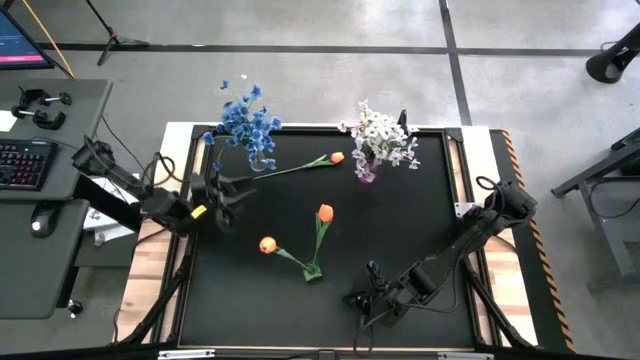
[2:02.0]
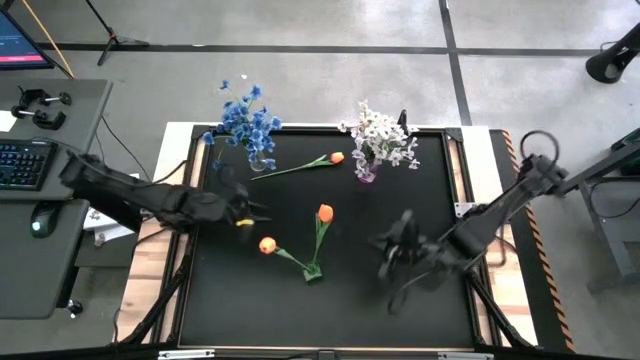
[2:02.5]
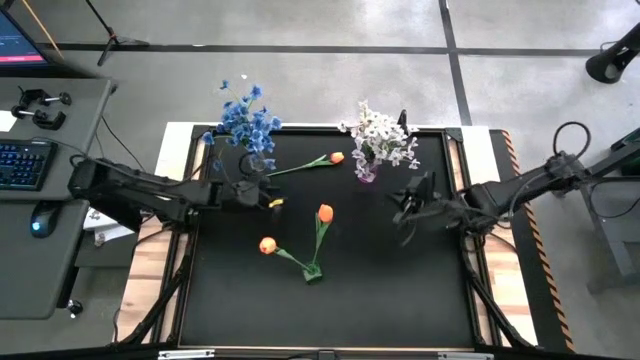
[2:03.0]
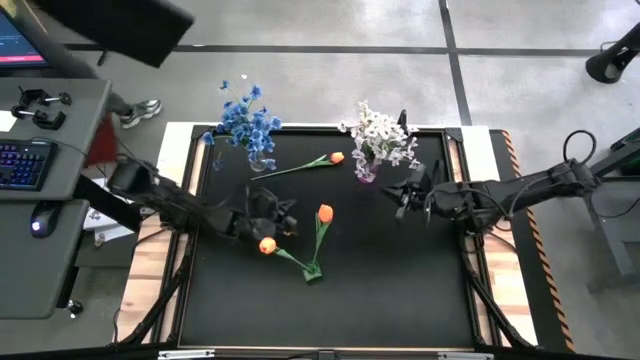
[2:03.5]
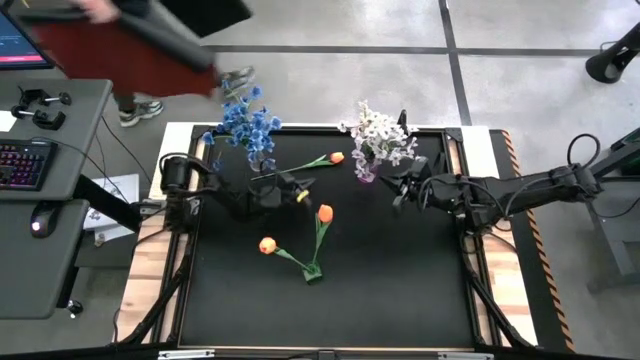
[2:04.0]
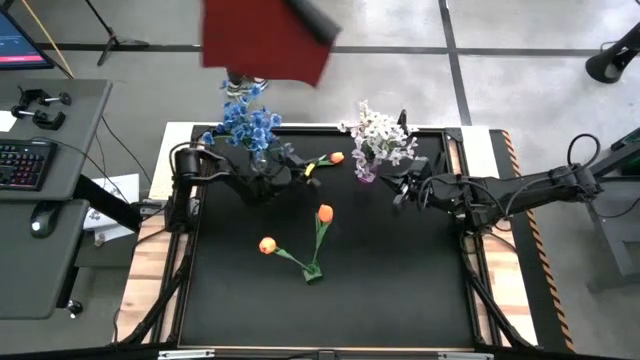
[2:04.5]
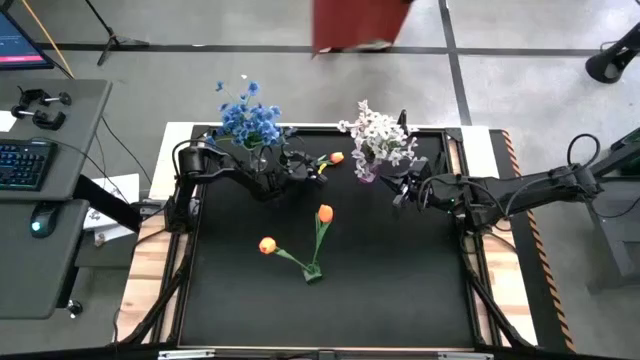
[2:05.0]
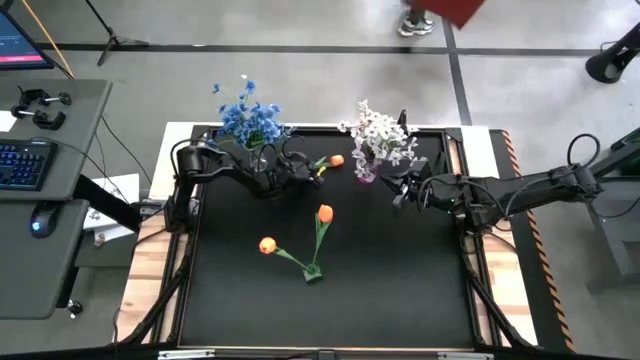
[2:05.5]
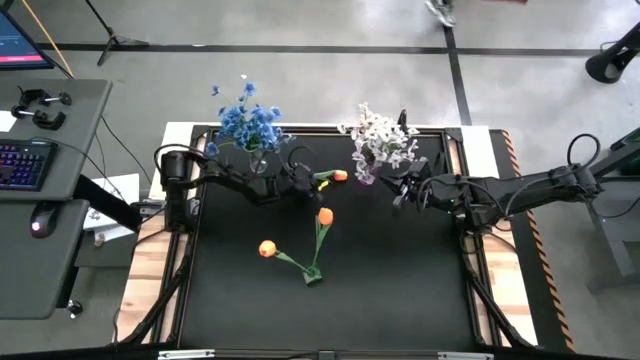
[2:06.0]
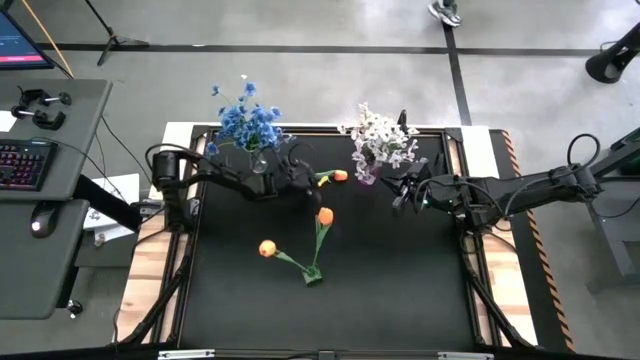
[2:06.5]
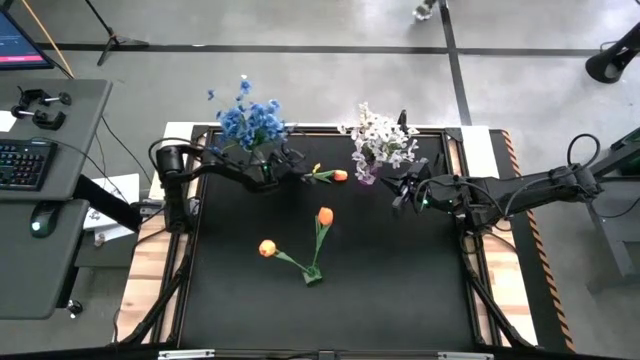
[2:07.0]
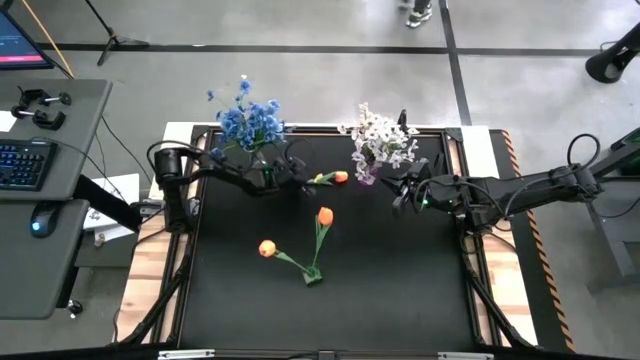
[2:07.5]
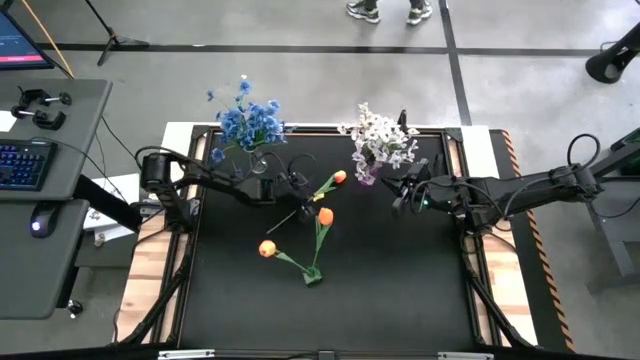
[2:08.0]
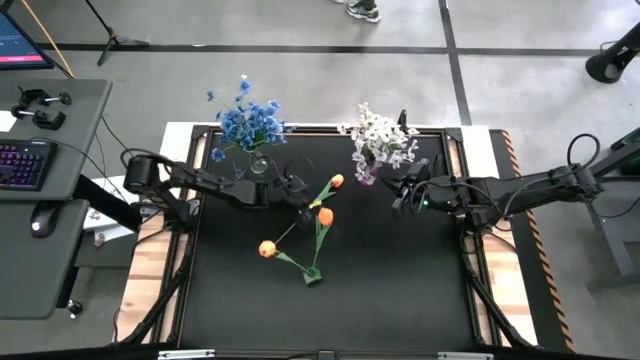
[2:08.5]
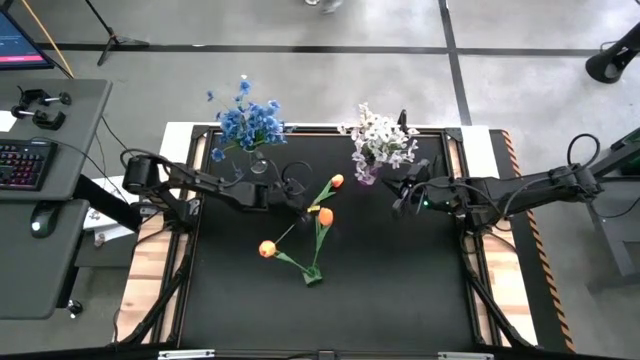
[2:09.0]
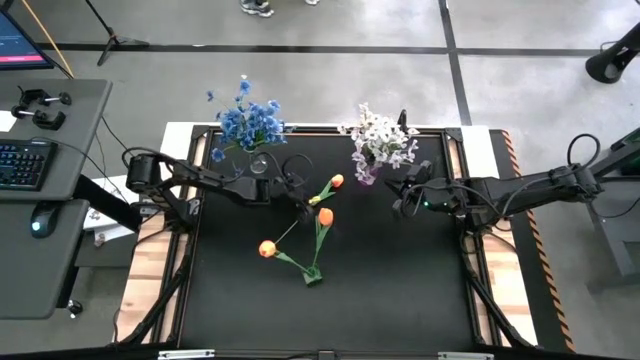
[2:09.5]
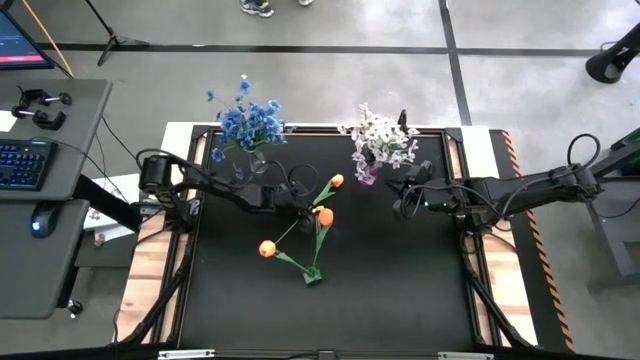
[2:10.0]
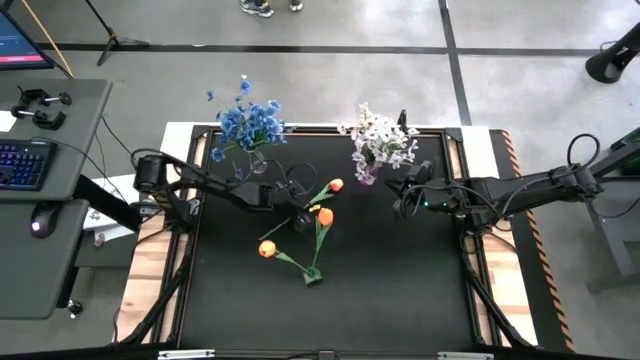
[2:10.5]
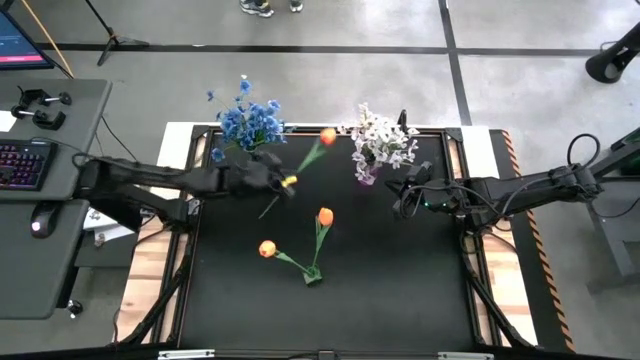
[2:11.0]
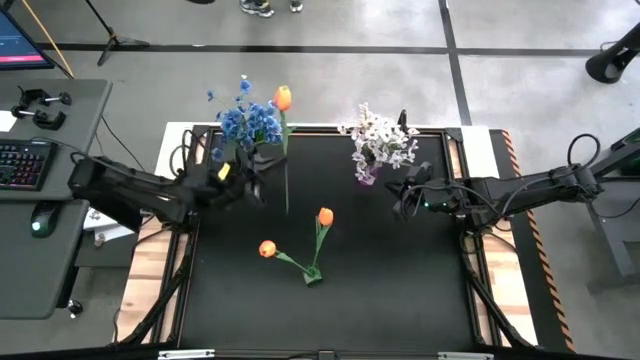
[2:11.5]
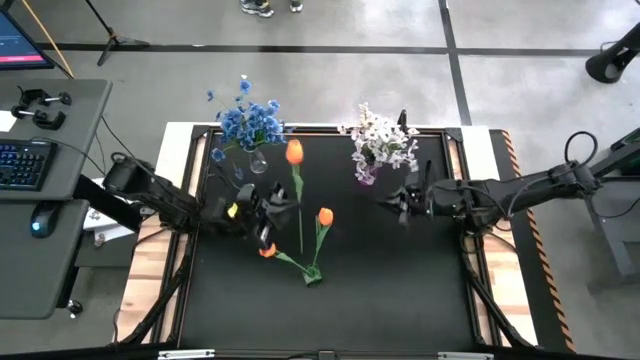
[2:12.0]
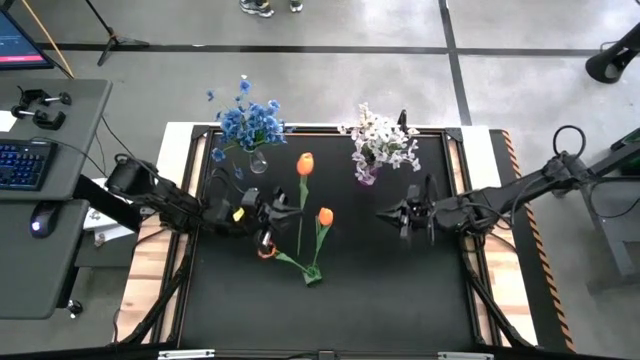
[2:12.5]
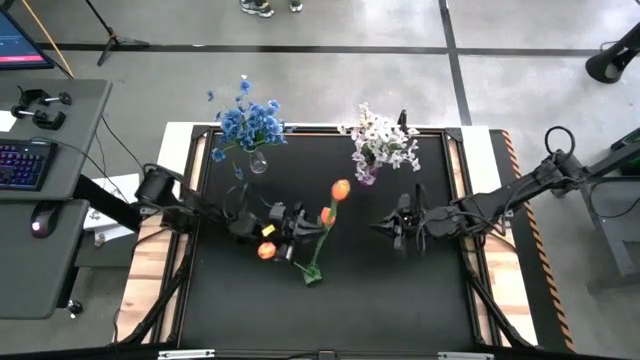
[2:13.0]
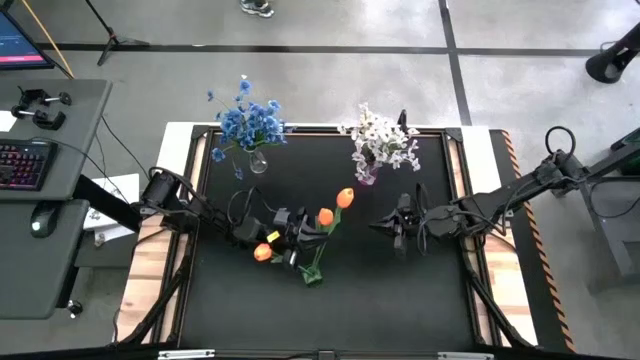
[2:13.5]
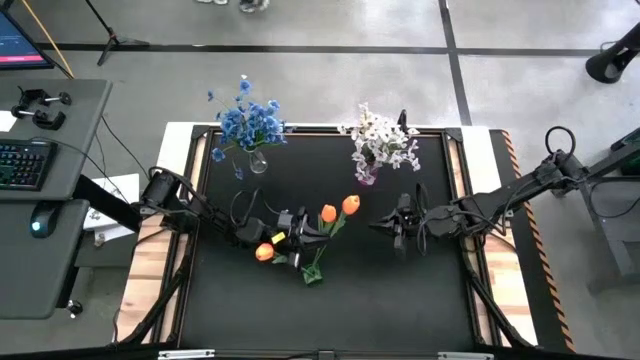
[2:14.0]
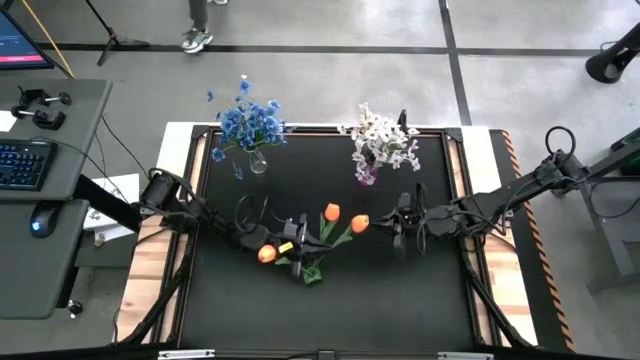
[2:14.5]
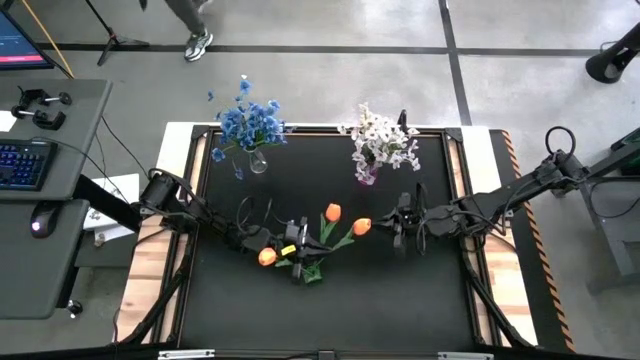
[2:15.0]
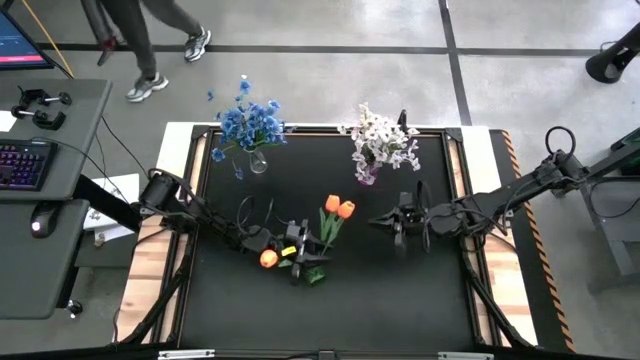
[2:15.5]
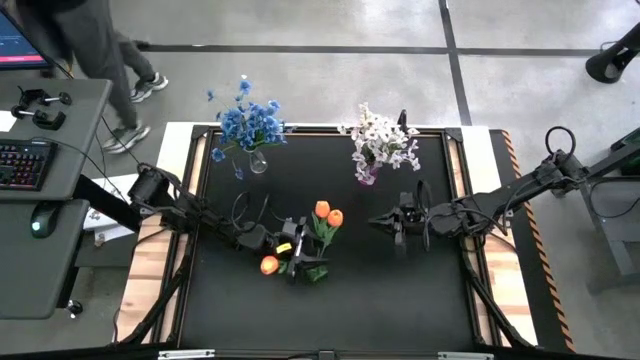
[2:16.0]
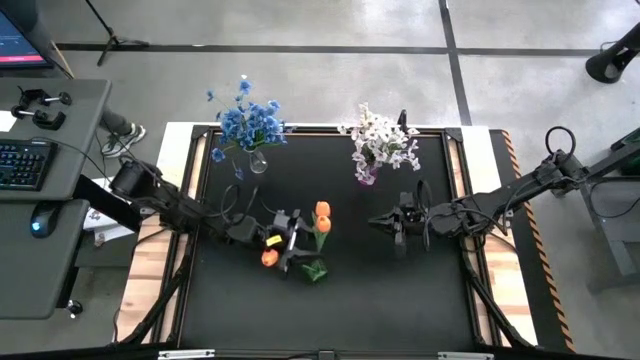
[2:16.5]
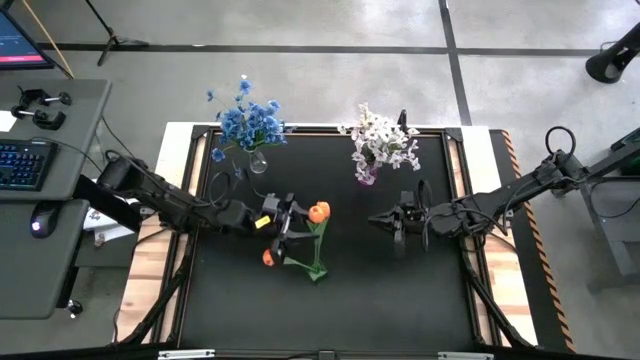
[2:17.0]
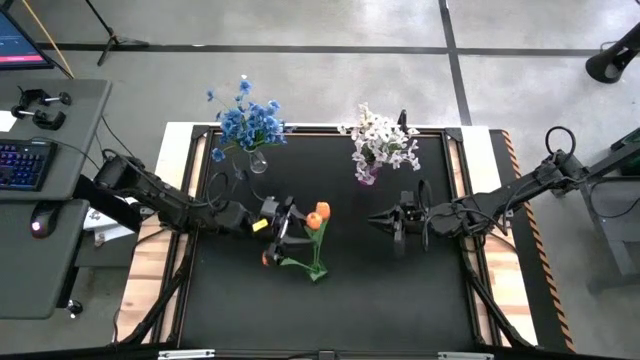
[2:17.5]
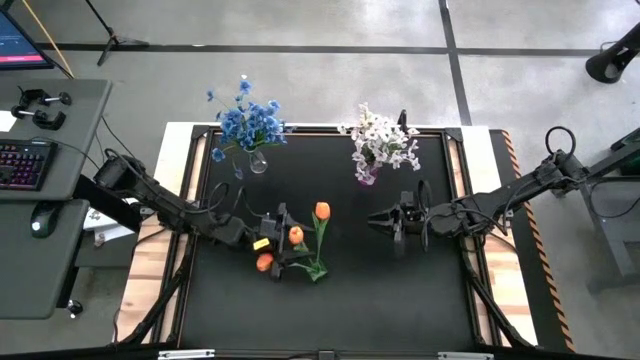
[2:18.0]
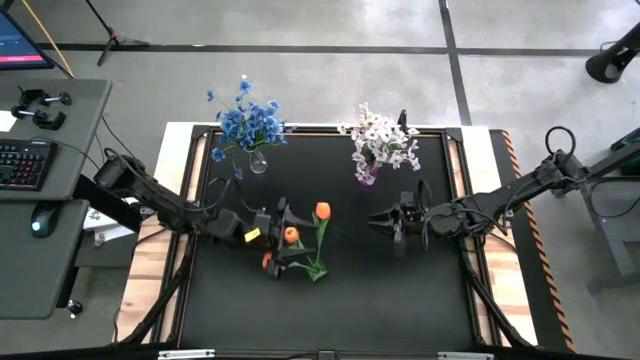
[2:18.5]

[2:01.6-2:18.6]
Task: Sort flowers into vase by color
Put the orange flower into the green vase

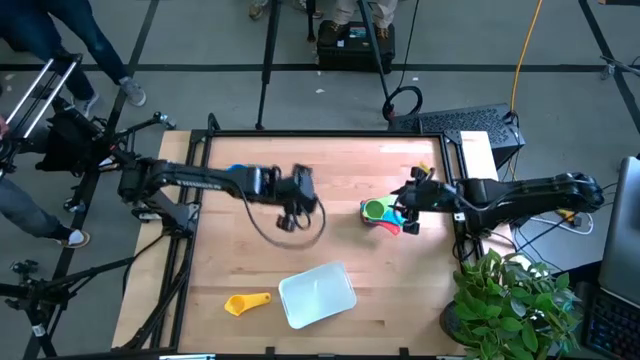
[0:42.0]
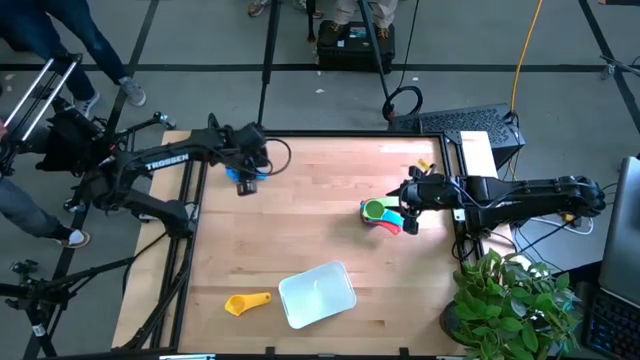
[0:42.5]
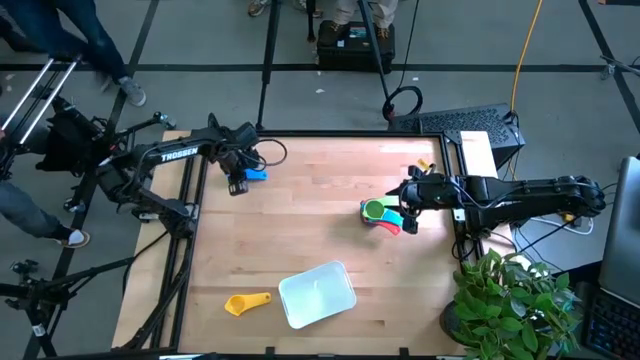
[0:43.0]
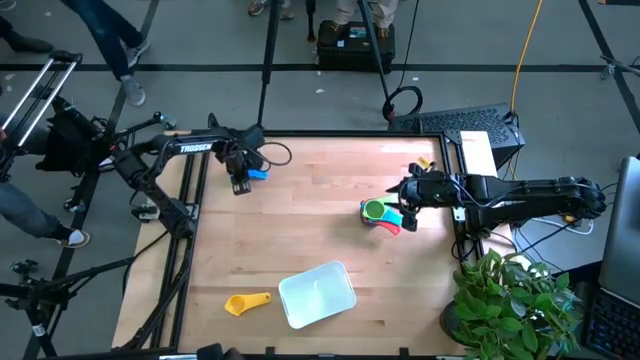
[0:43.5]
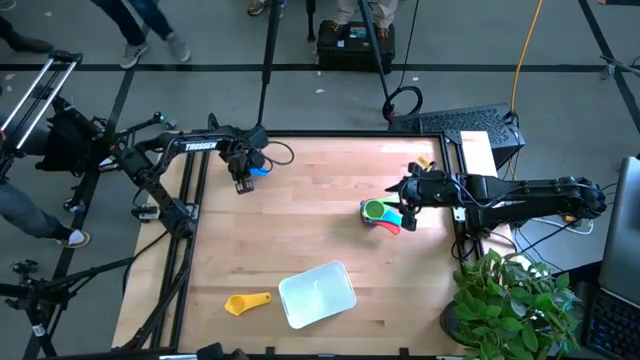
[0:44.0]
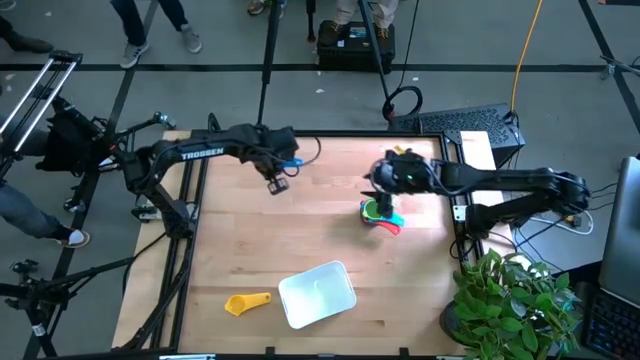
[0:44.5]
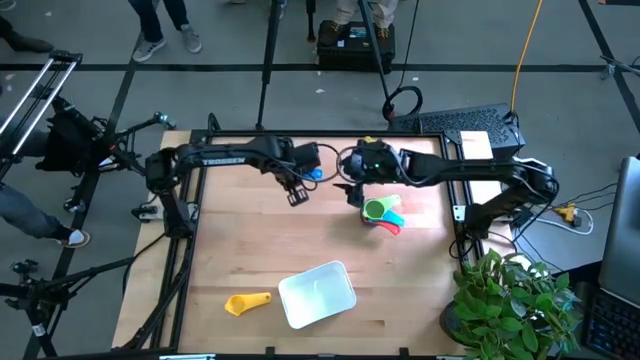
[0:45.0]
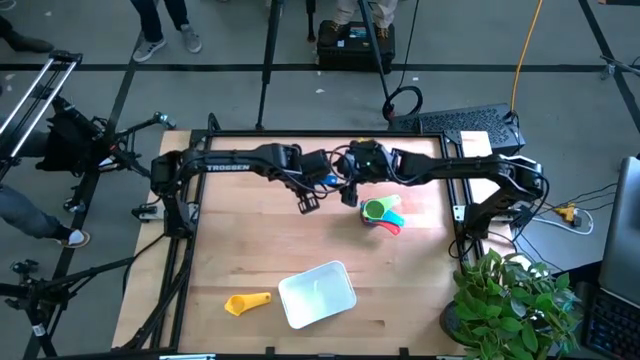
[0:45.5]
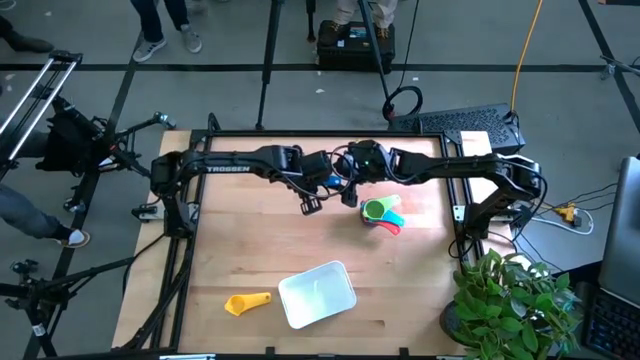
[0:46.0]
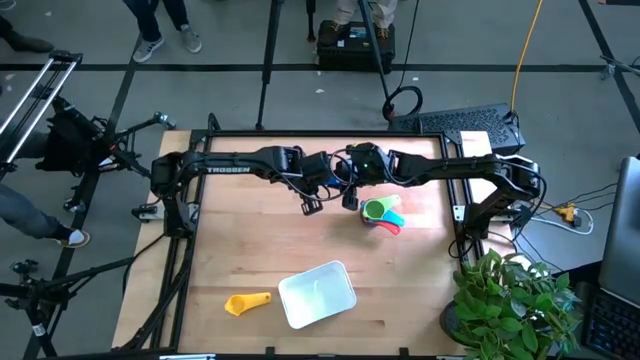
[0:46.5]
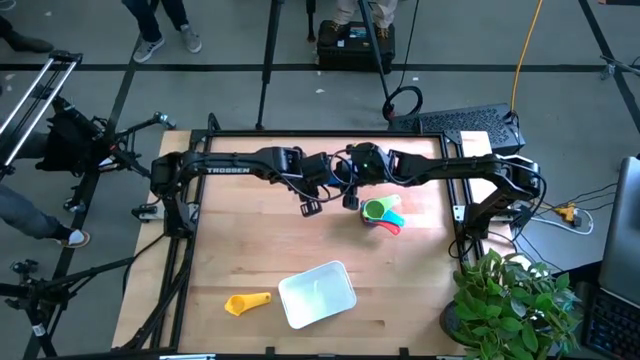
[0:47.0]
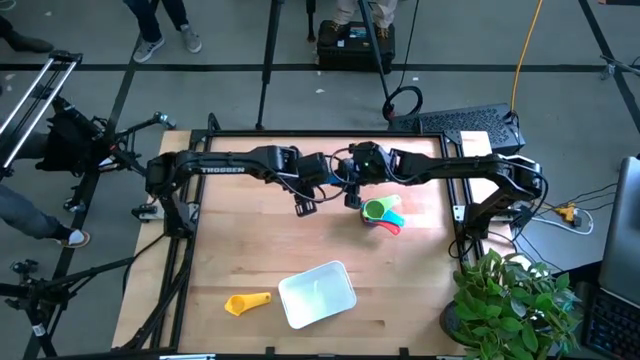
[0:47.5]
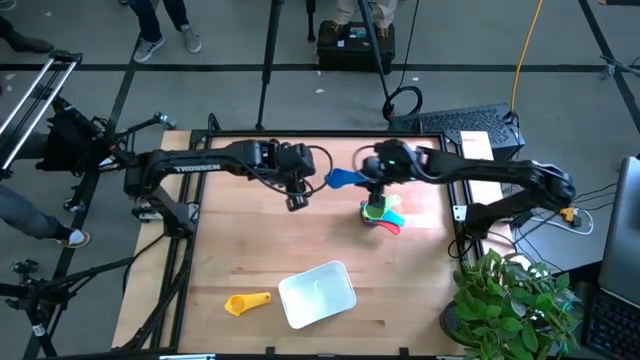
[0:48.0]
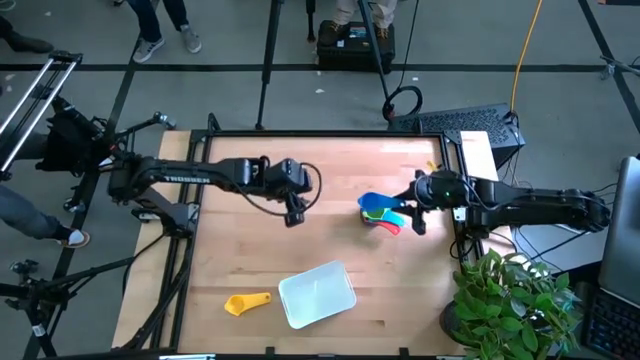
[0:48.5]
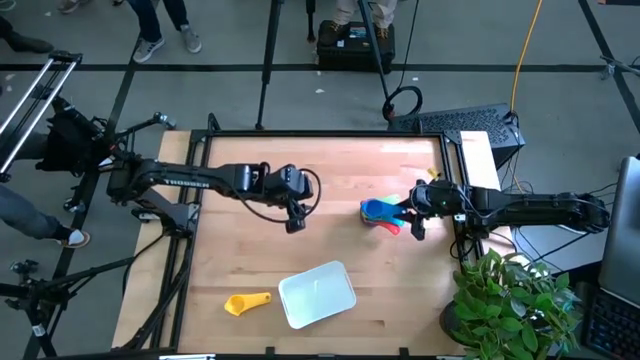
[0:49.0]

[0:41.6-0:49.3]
Task: Nest measuring cups in basket
Stack the blue measuring cup on the green measuring cup
